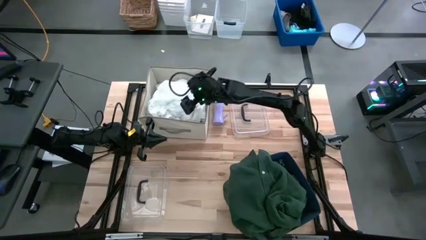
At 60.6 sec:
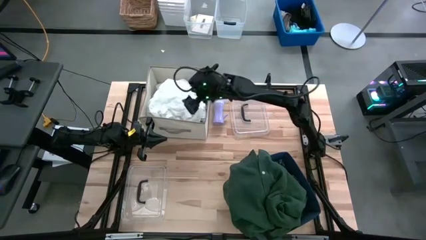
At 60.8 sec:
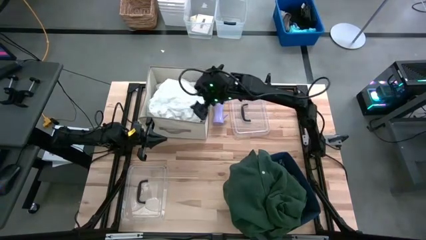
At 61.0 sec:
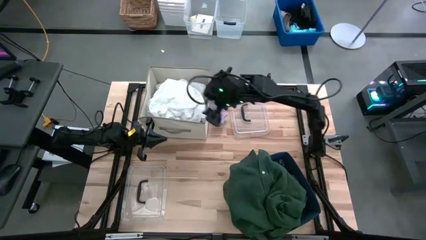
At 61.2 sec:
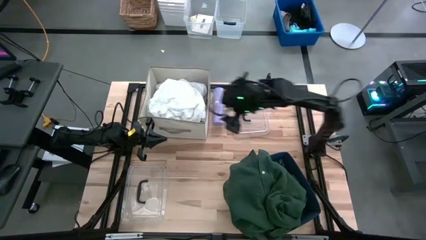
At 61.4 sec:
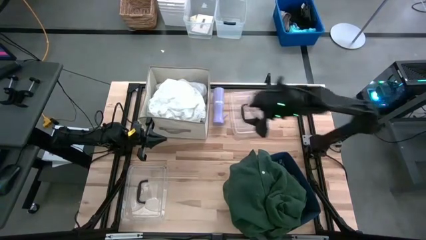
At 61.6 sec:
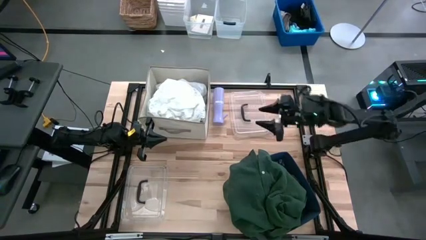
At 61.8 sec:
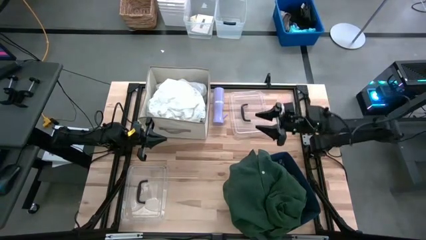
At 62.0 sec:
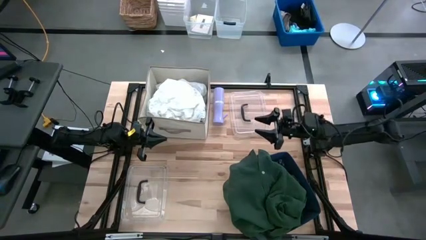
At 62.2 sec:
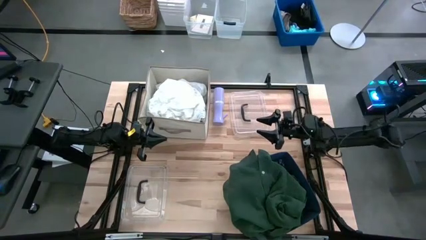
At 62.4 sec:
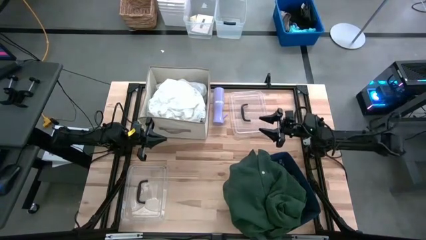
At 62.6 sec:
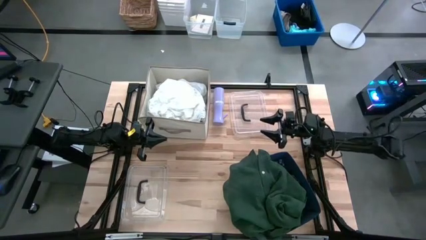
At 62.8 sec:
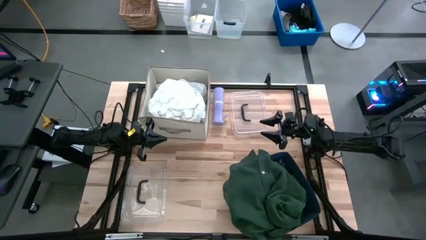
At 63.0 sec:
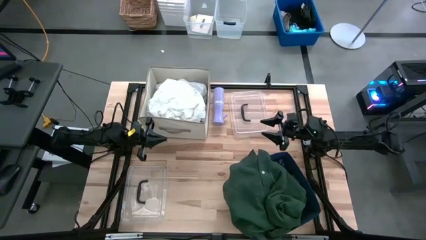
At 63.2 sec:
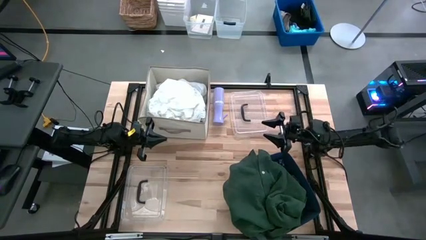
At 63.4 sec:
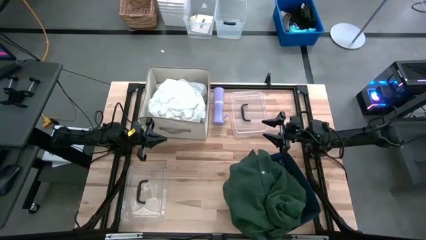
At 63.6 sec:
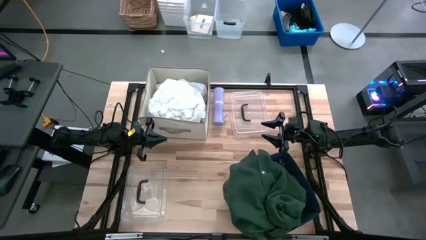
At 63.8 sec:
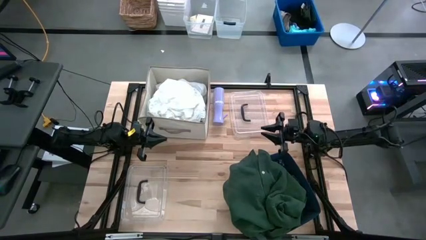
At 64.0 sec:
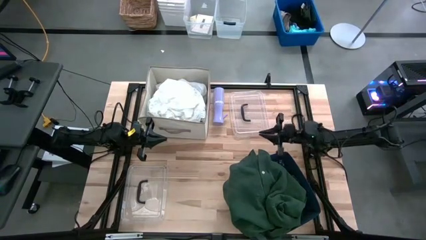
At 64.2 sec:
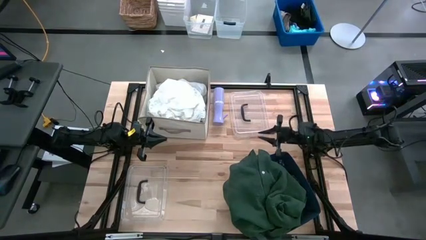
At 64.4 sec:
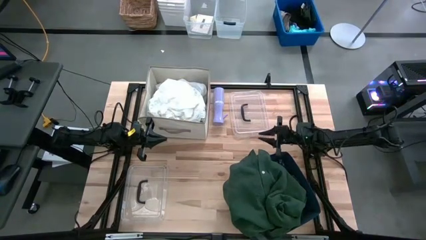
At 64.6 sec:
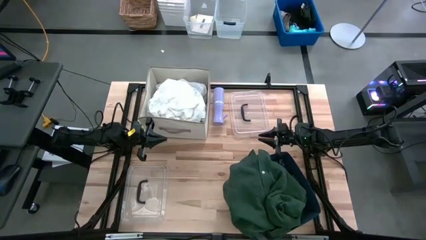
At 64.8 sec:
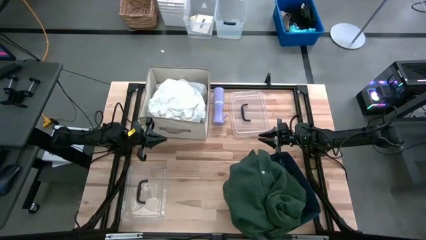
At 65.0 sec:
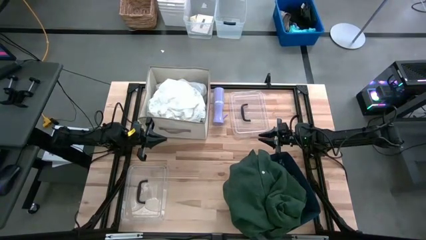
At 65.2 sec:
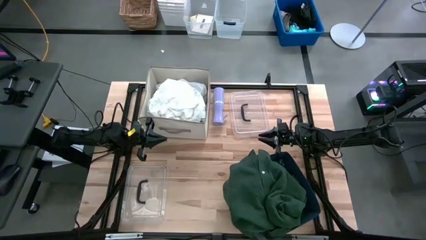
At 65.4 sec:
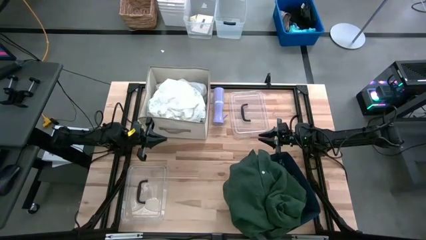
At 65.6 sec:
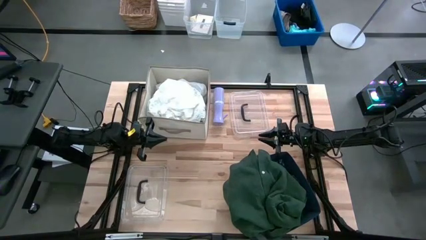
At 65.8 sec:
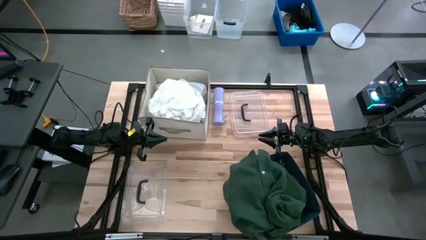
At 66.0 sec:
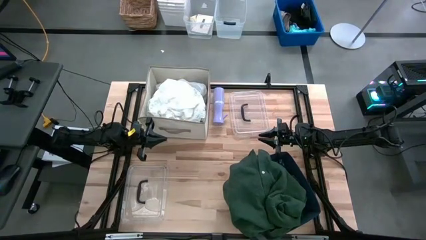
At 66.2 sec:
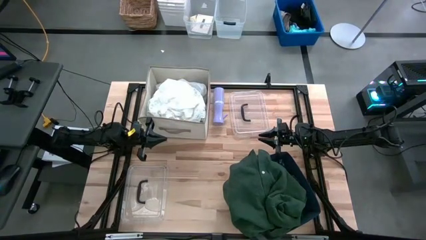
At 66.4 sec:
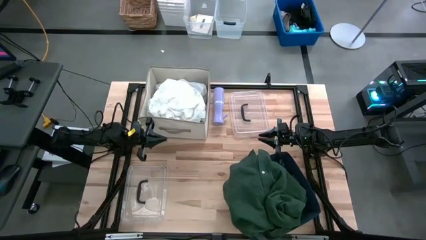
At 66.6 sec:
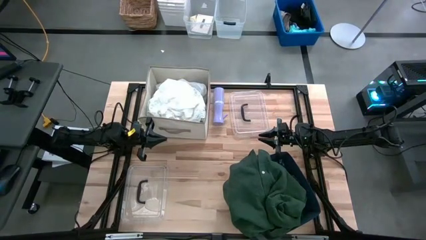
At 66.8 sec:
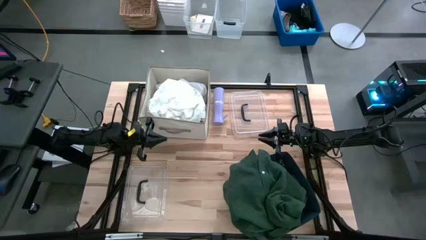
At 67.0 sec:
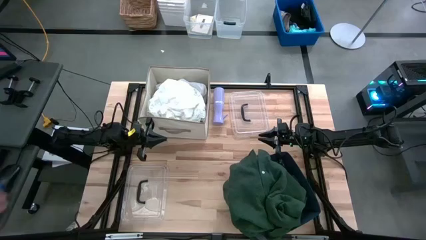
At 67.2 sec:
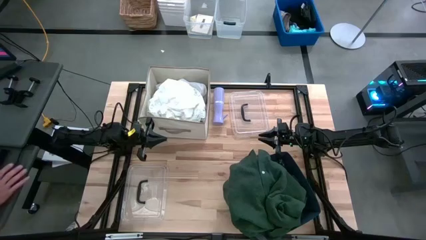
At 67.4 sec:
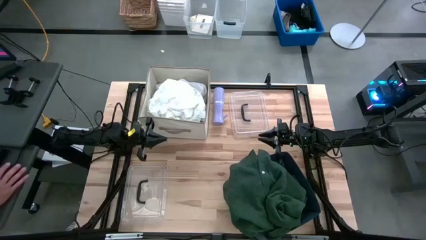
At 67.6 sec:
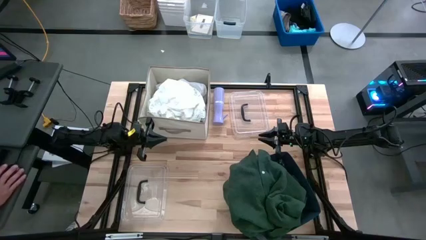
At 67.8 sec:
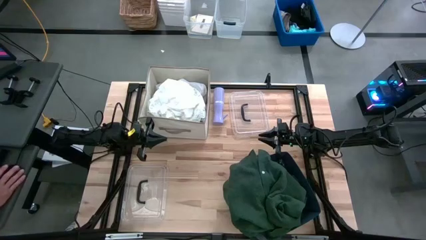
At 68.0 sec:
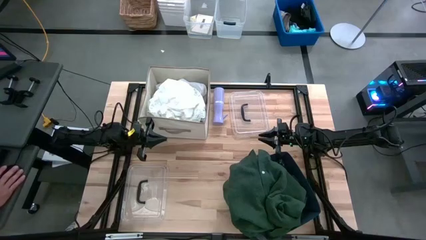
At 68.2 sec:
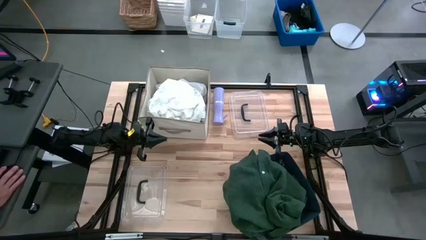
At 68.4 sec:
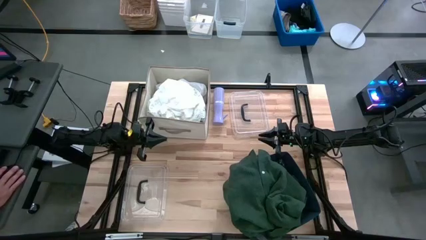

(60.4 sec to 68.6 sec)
Task: Sort clothes
Return to Home Position

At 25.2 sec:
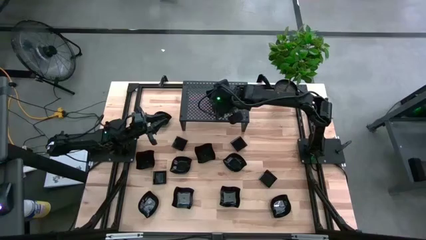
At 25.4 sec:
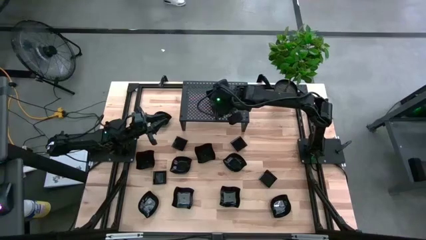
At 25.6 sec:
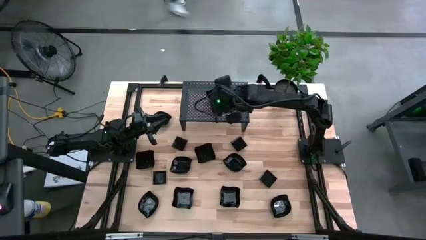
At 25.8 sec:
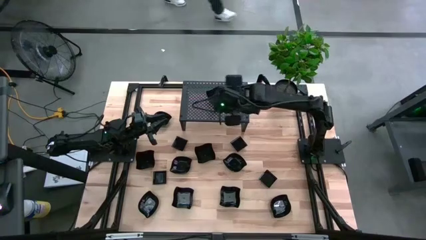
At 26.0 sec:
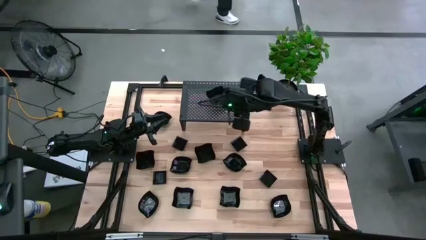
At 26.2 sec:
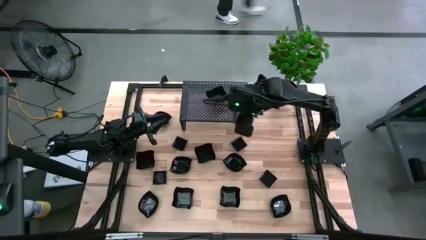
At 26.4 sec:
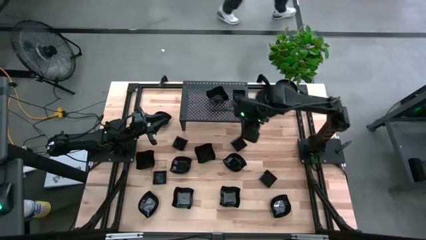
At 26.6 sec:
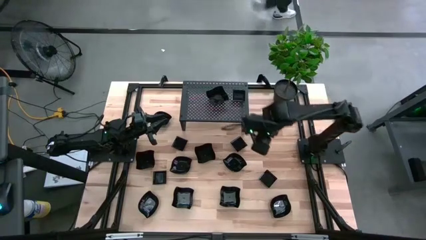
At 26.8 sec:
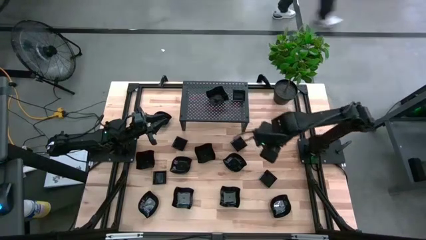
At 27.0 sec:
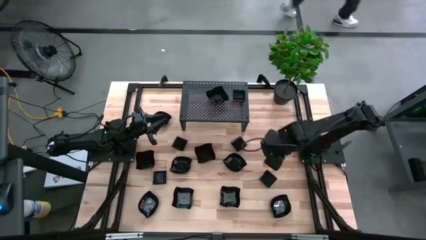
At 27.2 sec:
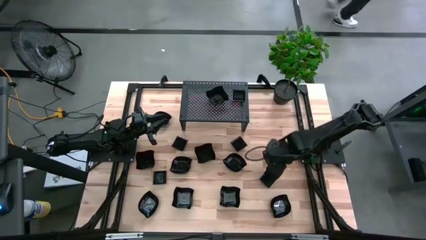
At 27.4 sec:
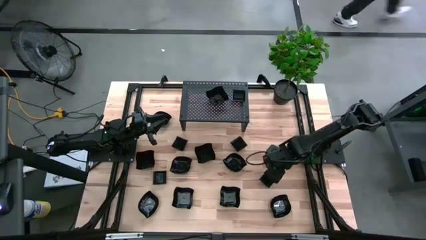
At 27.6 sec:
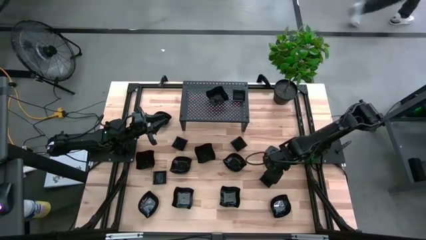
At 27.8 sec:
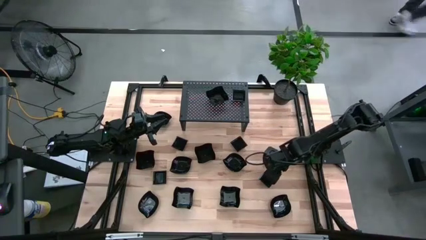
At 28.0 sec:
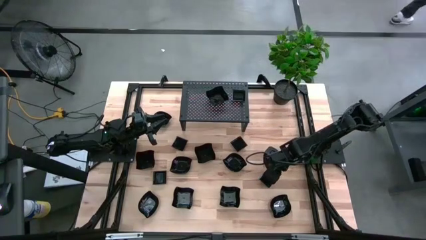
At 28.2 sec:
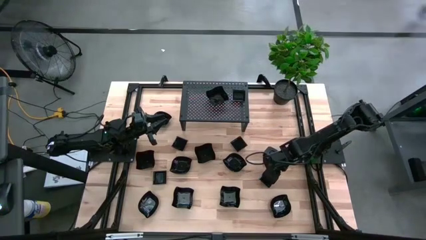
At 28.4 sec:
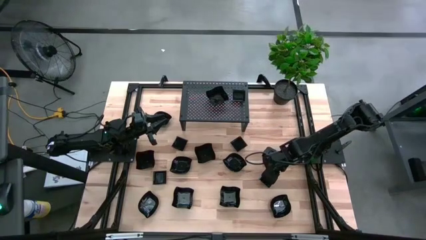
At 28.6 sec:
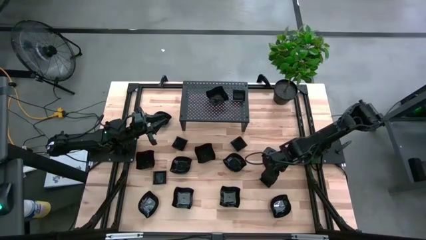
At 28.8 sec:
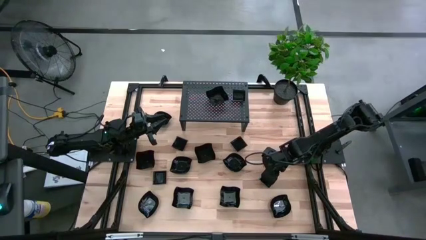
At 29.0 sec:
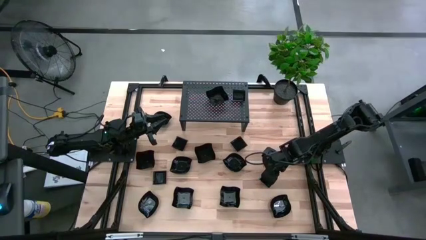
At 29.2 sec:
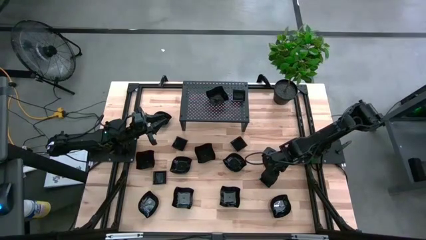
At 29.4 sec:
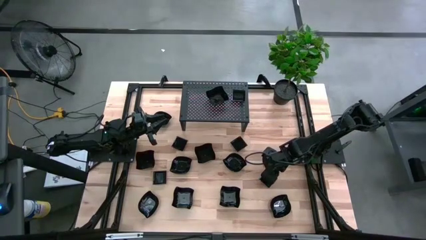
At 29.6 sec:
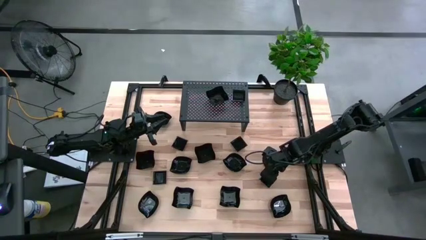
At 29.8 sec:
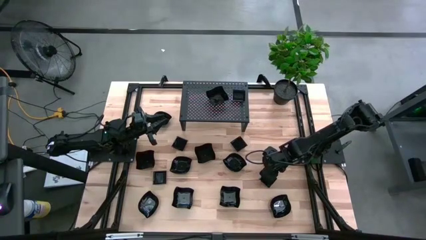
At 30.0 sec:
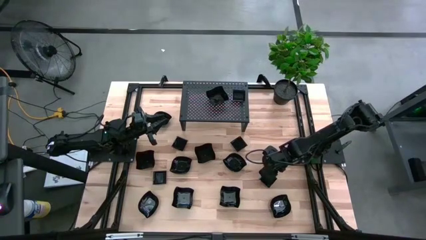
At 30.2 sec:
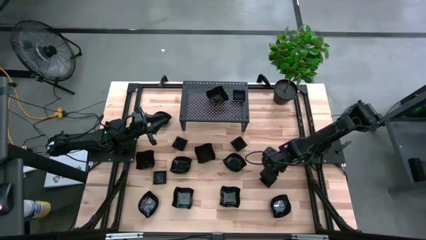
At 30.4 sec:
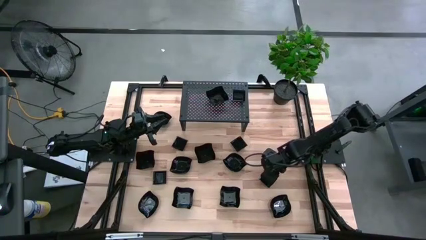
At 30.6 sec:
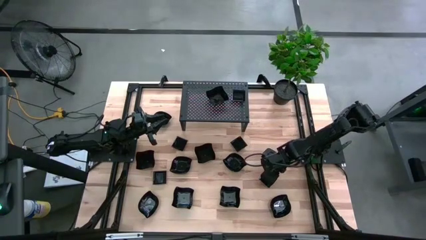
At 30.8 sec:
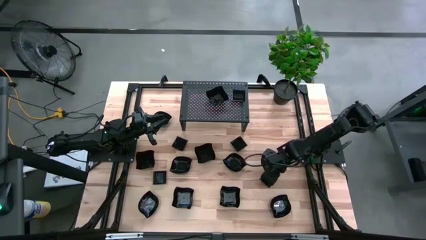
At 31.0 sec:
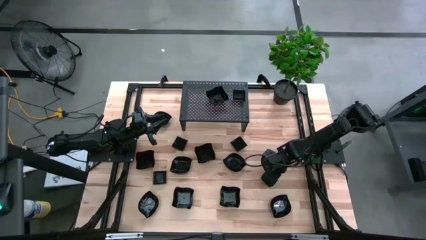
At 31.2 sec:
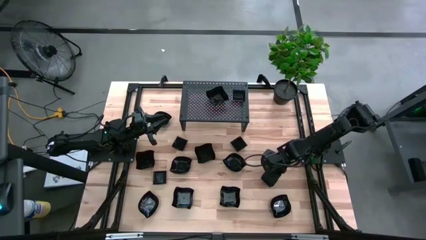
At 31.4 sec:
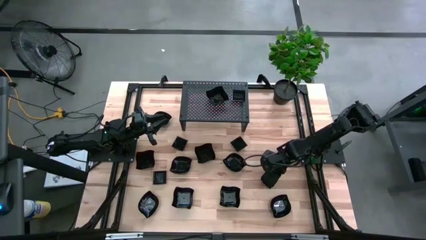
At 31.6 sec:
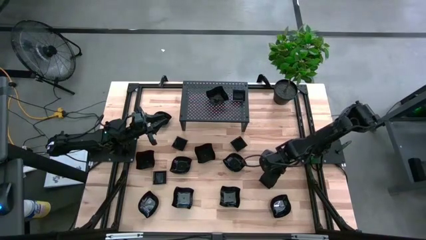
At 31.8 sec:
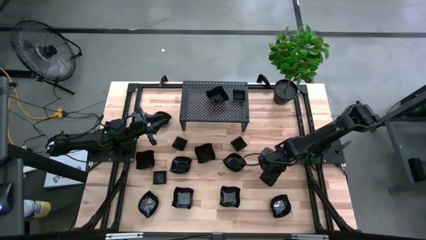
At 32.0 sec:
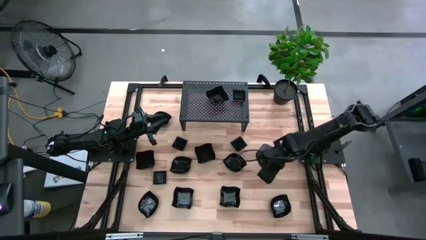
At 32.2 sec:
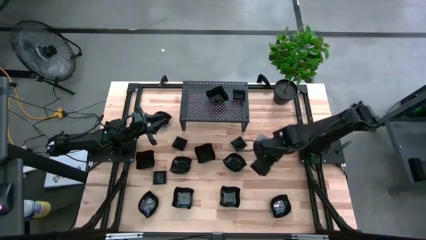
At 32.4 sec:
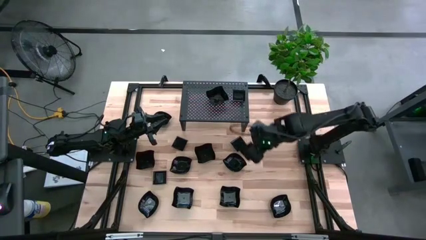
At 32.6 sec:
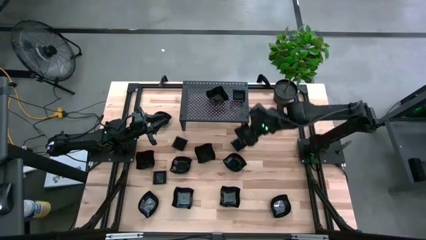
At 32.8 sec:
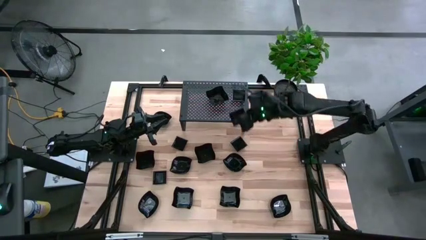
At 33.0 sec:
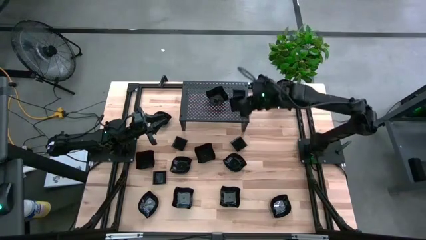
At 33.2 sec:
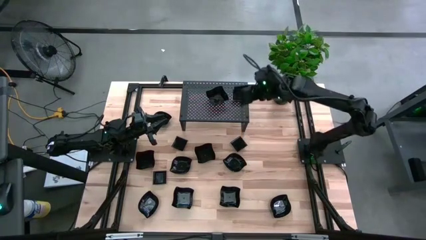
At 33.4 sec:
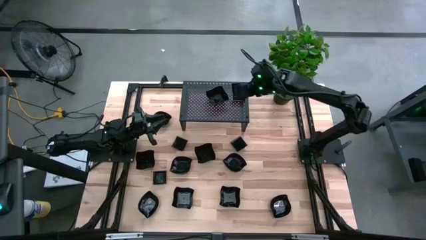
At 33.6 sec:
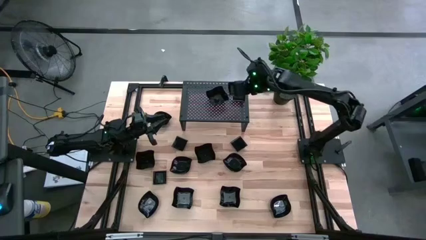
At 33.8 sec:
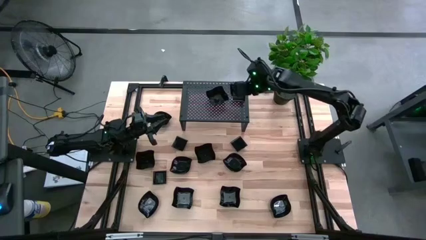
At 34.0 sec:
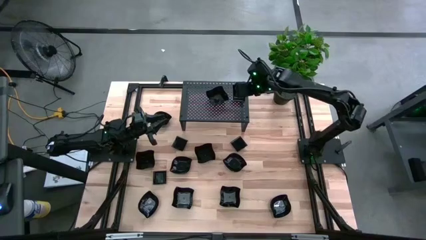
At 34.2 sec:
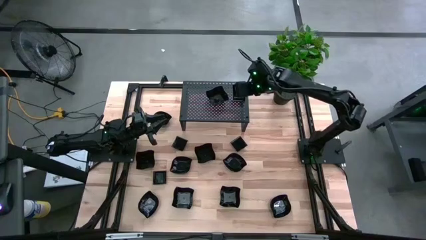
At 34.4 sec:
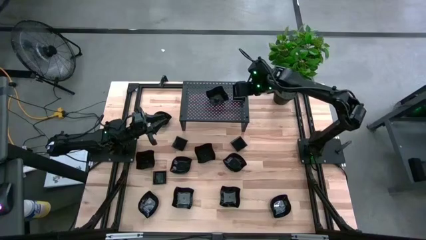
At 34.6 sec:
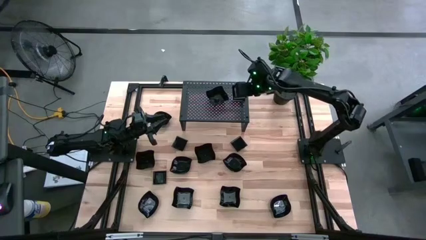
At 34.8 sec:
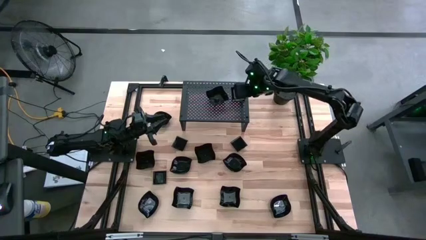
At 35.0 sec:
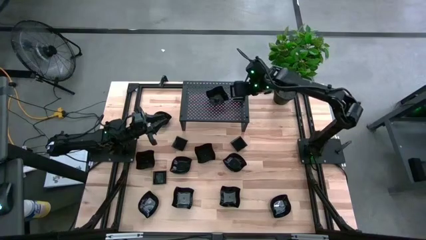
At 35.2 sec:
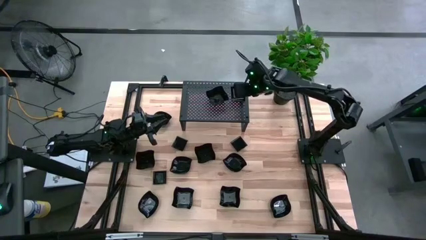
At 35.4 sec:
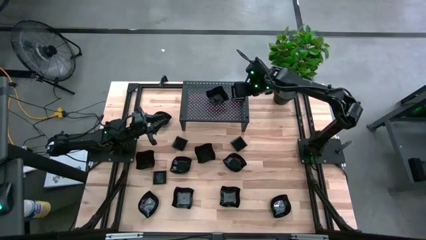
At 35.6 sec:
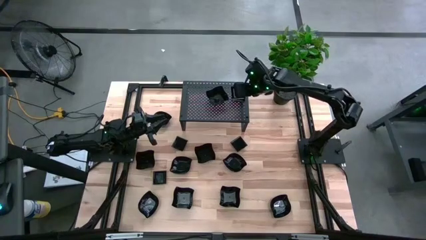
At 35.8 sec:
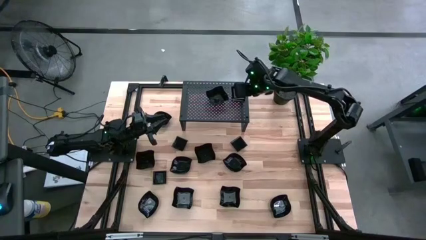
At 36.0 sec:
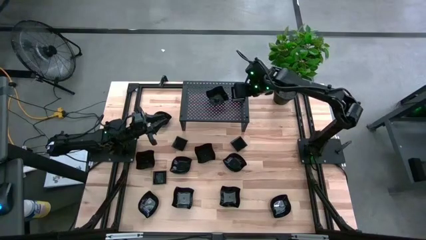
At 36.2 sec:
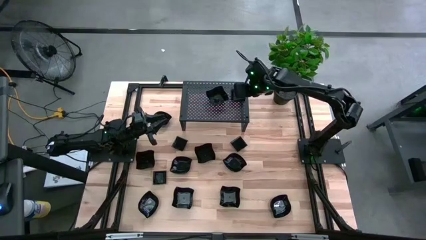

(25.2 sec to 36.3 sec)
Task: Pick & Place Mini shaped plates
Stack the square plate on top of the square plate on the shelf
